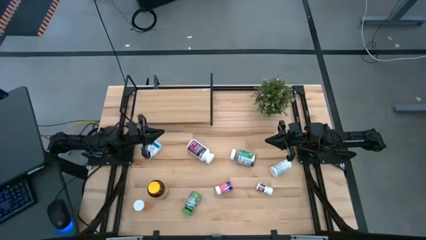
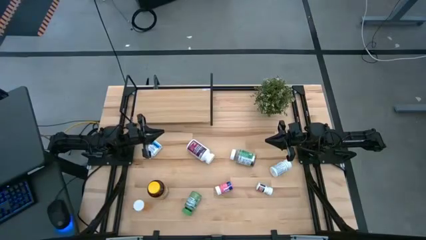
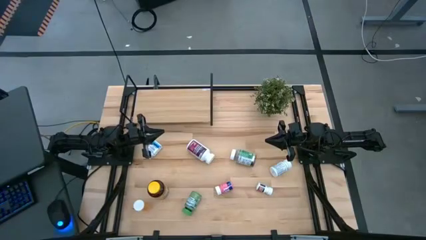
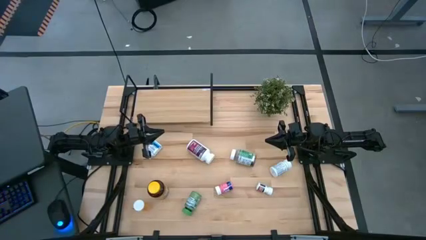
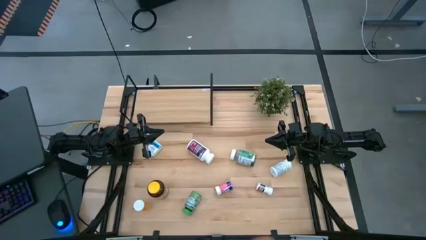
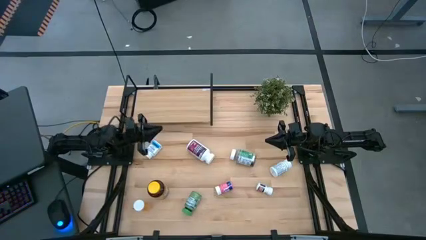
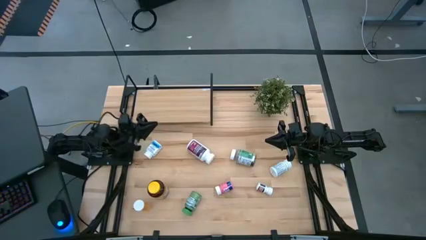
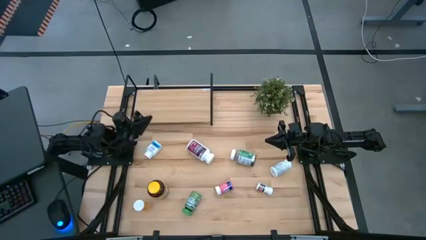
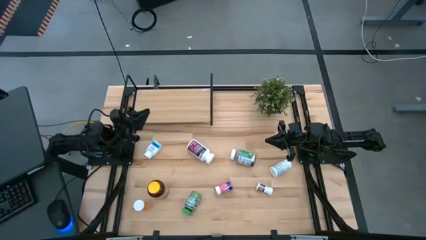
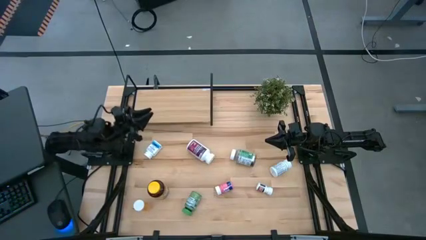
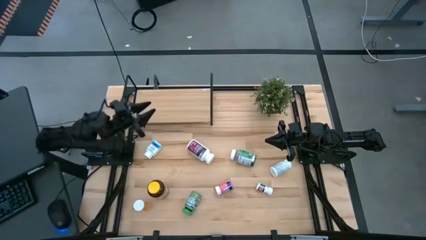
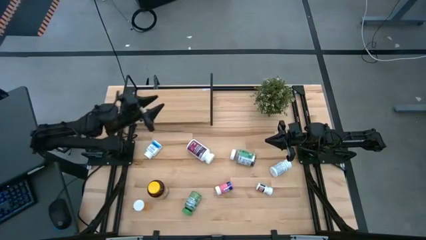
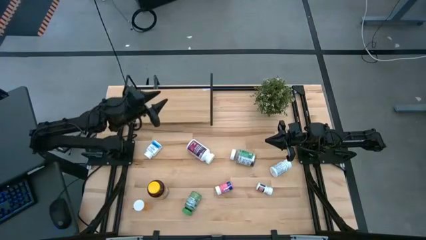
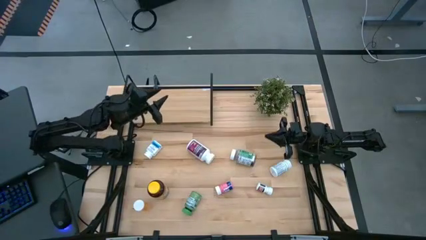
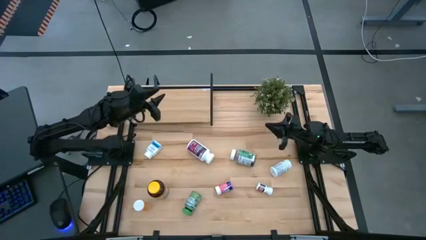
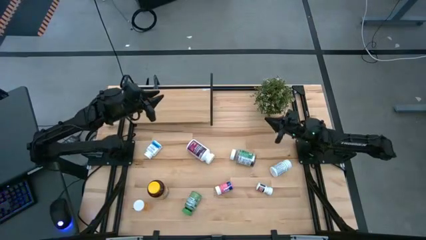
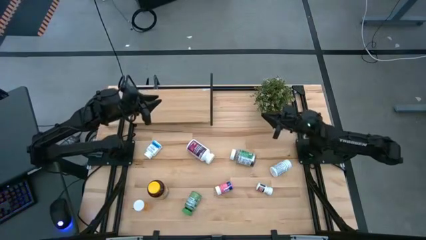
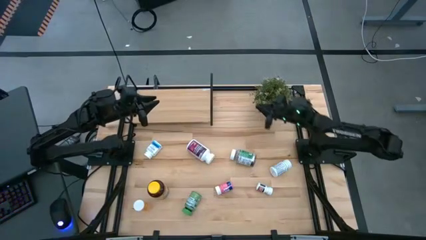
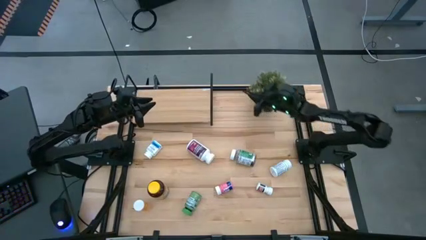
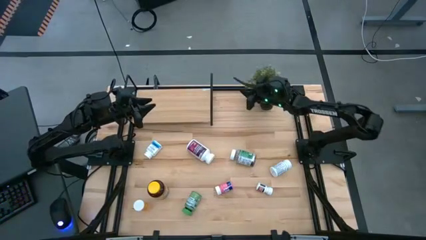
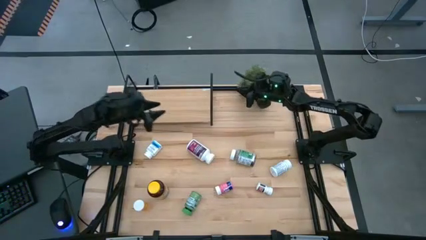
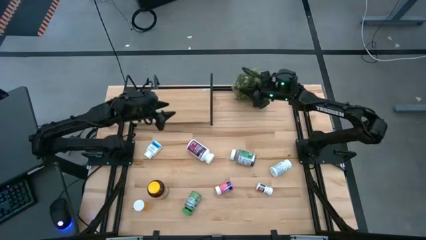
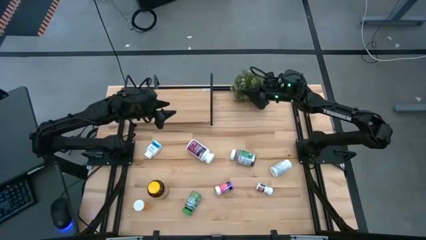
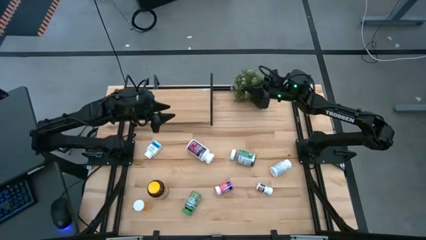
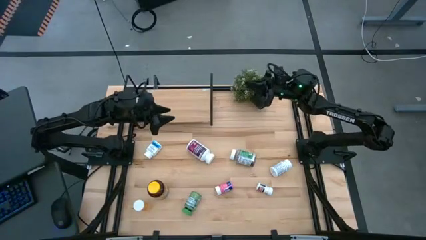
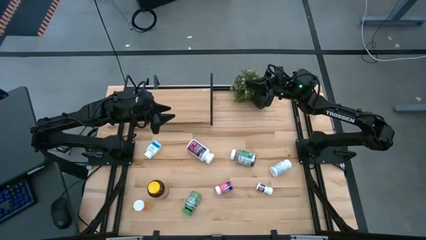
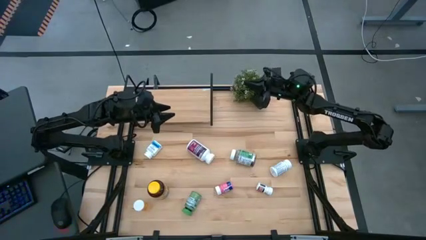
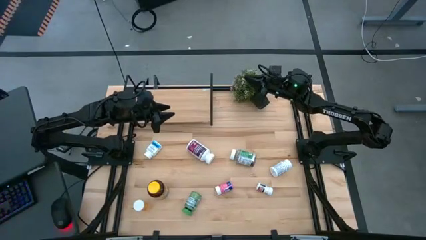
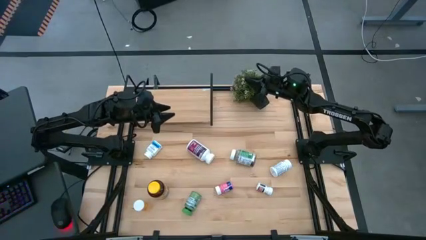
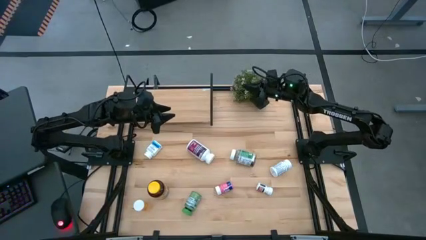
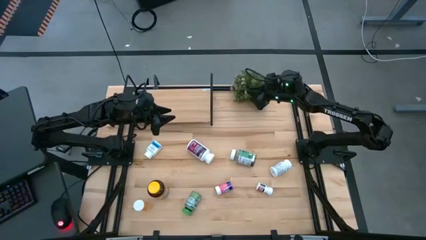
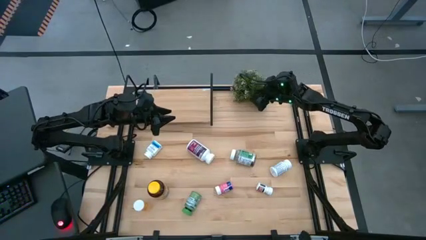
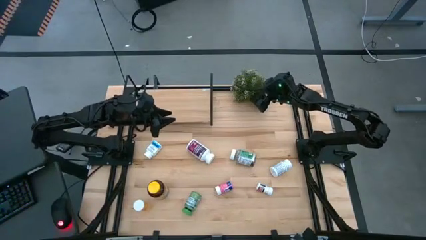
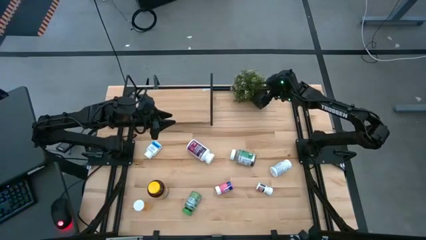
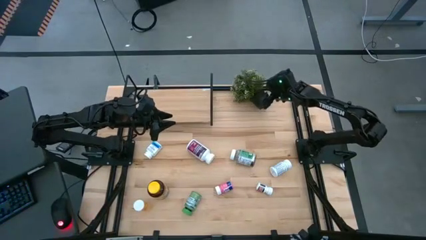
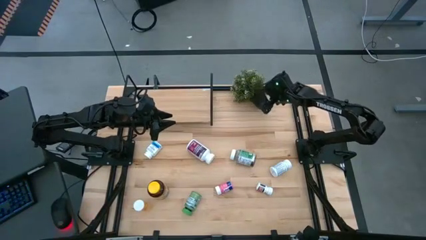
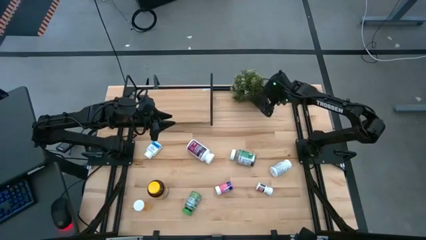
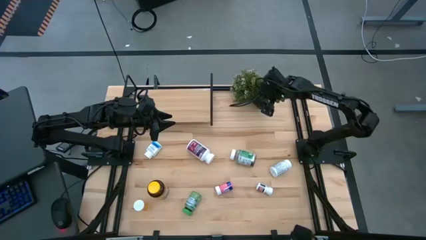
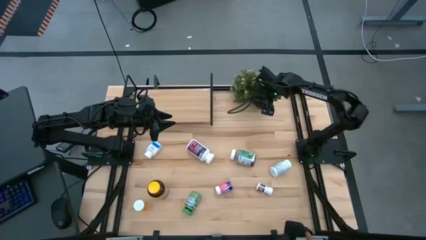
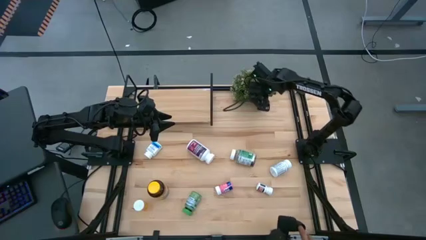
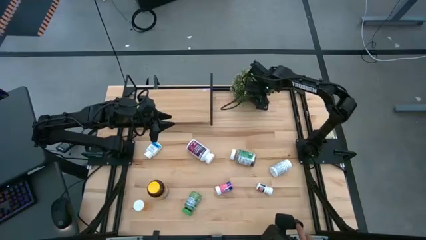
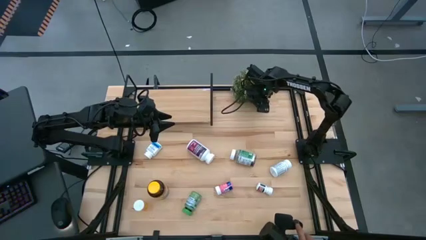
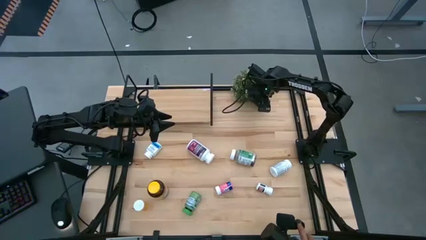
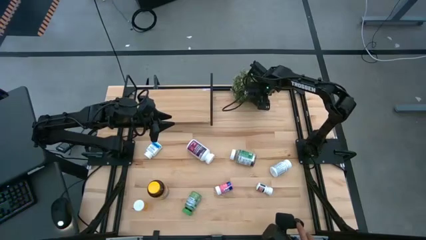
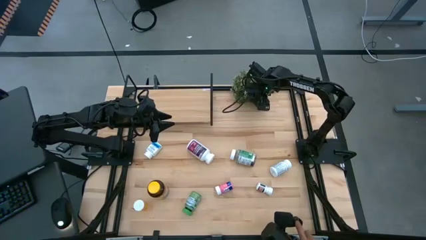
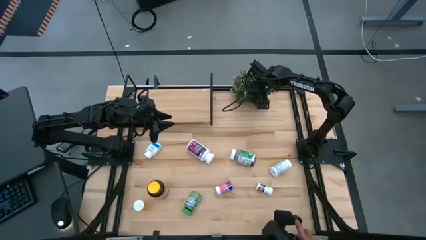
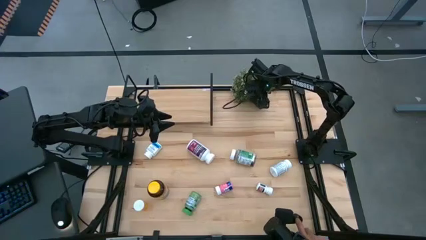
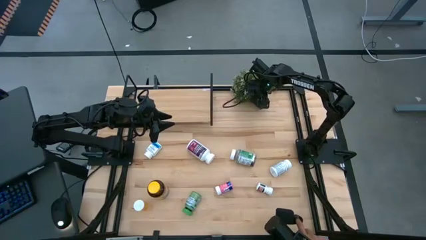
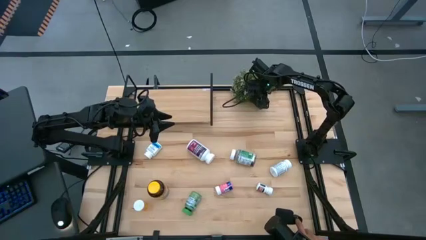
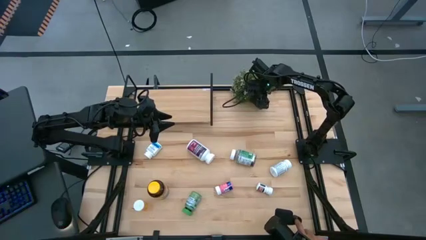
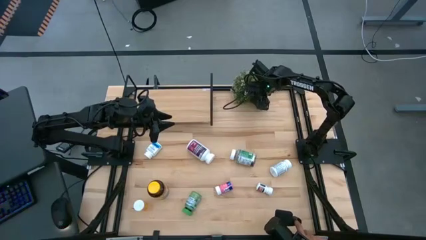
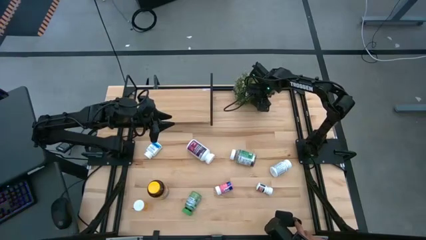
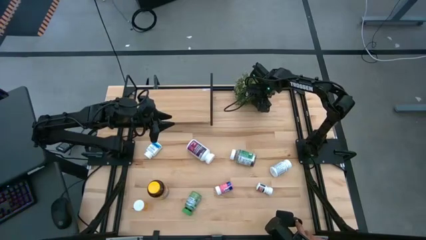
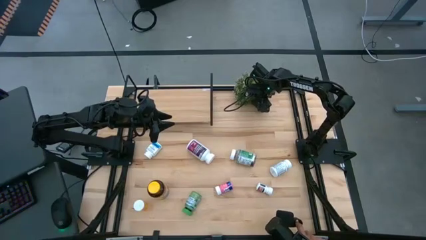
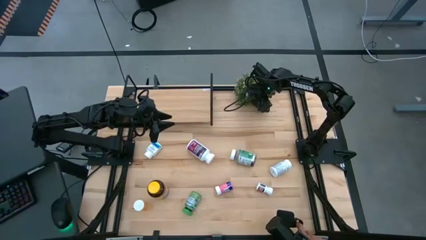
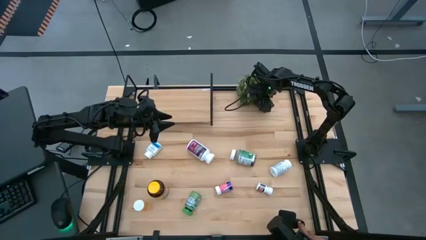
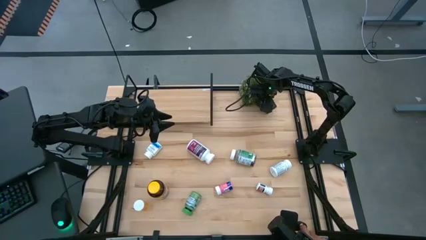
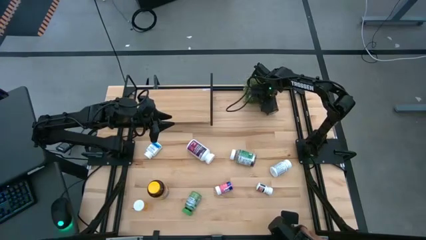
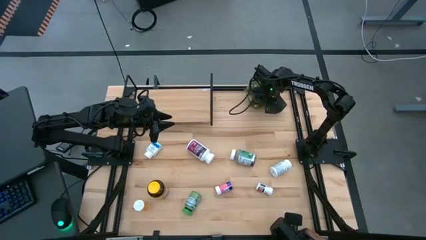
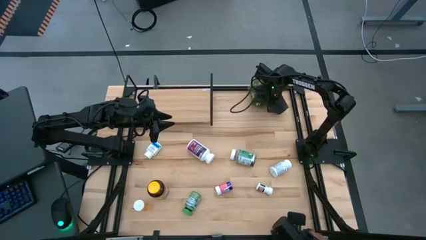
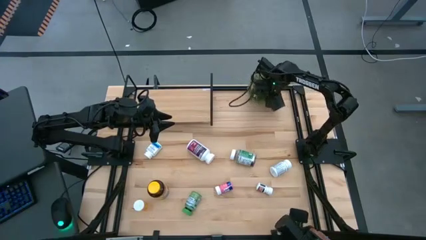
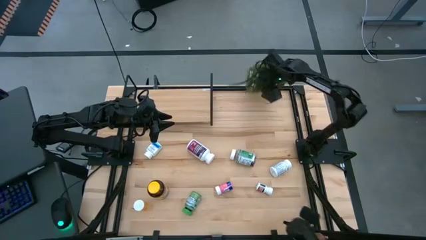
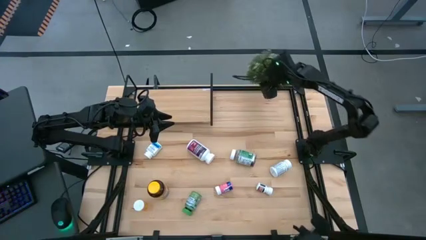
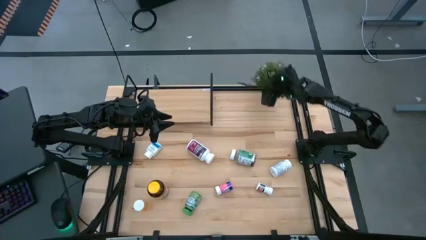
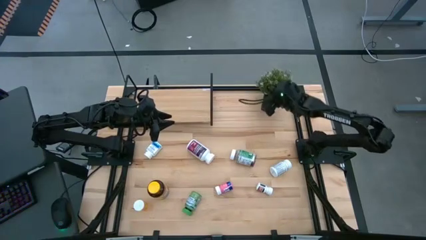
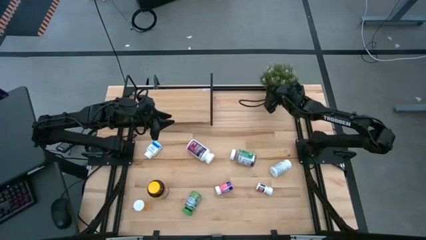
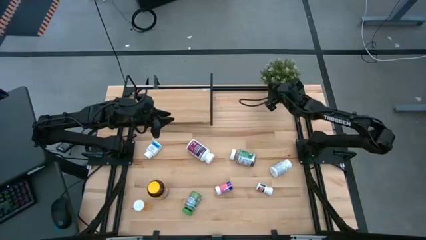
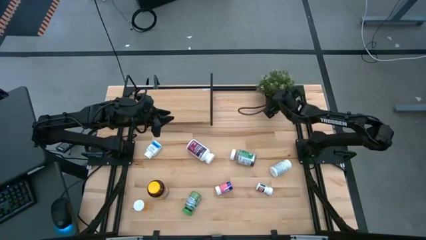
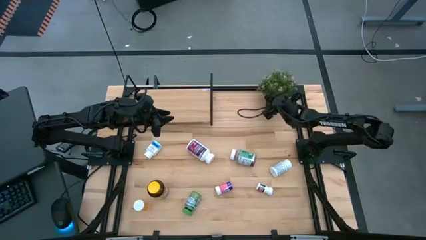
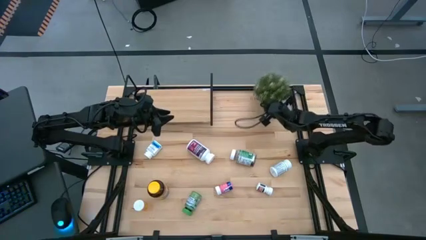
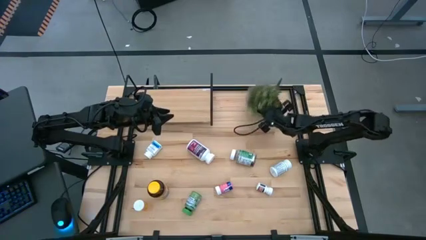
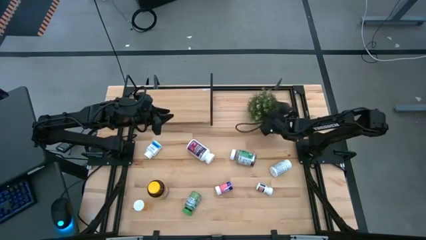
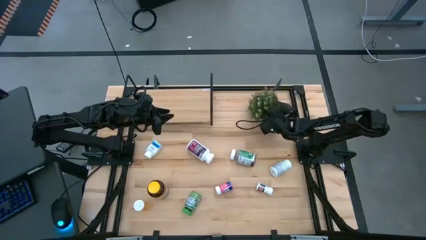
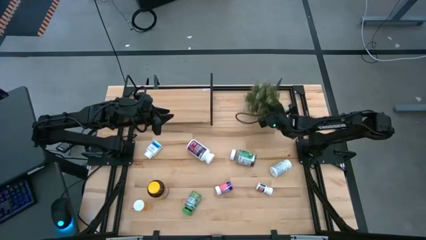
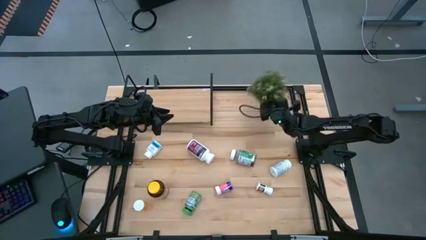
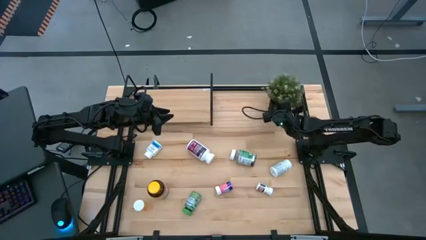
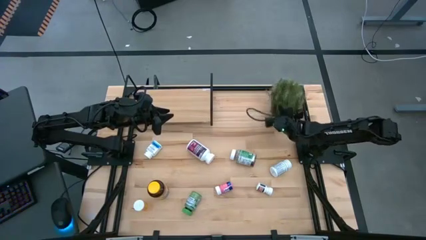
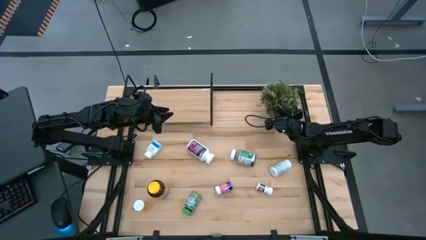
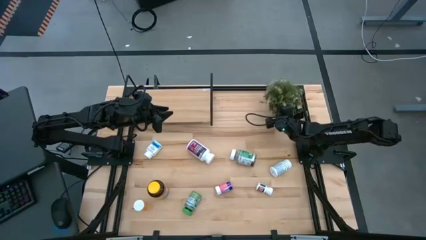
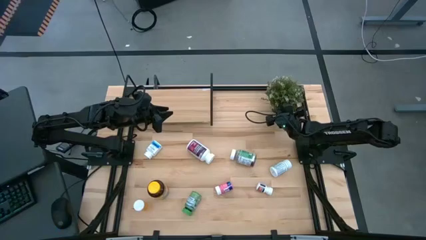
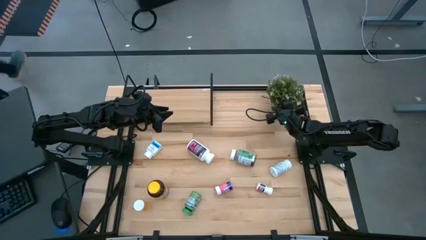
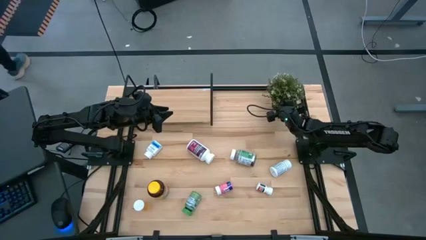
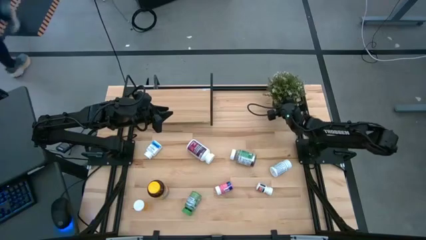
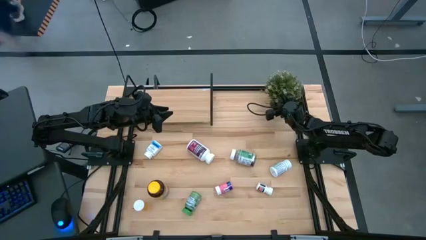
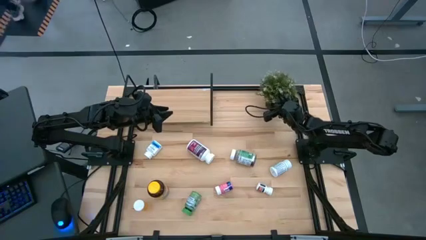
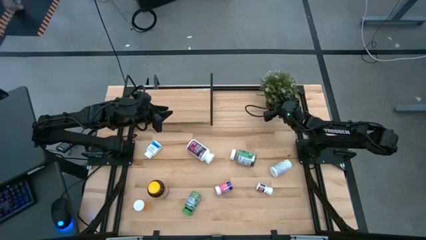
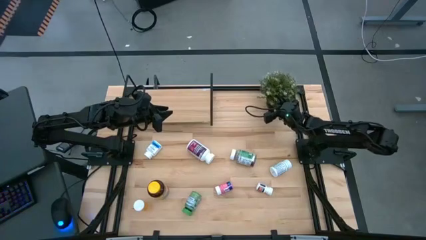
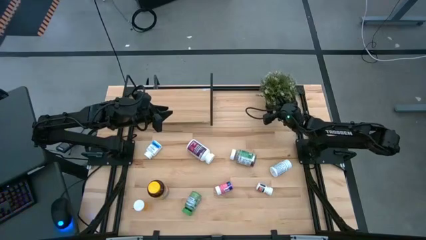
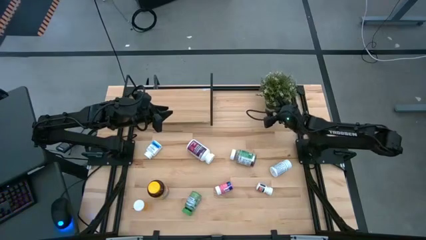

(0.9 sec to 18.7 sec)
Task: Pick and place medicine bottles onto shelf by color
Adjust the green plant on the table
